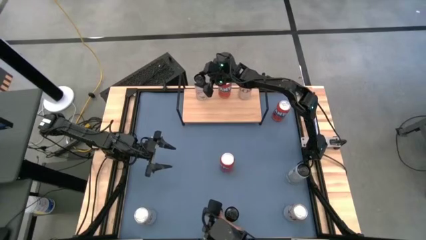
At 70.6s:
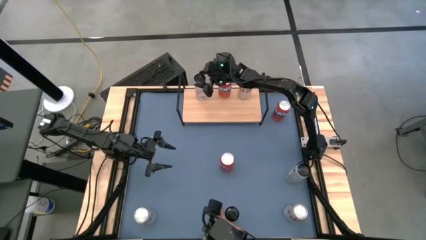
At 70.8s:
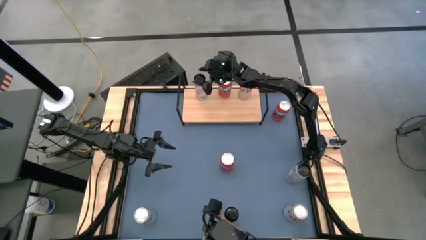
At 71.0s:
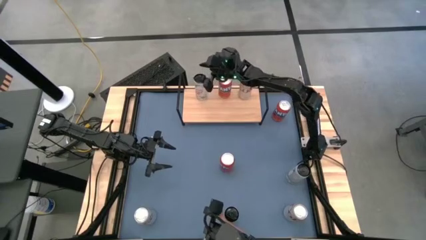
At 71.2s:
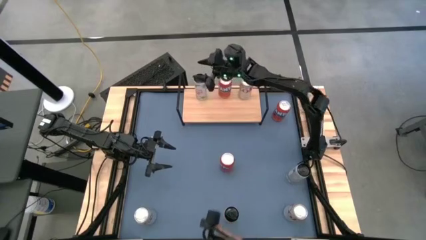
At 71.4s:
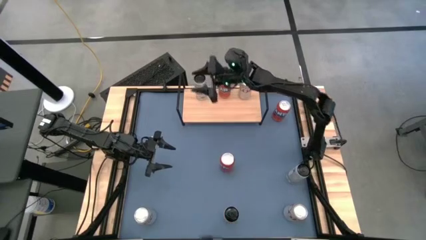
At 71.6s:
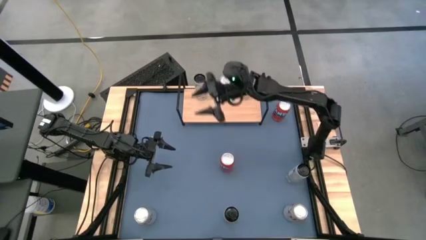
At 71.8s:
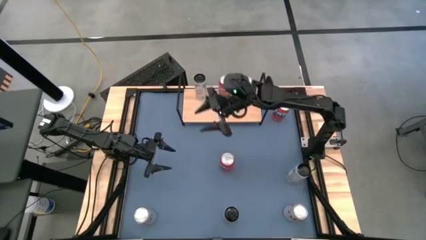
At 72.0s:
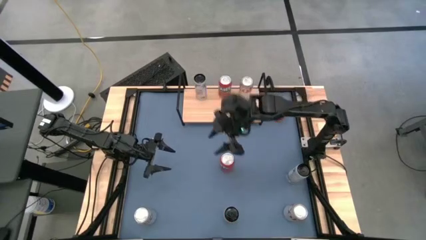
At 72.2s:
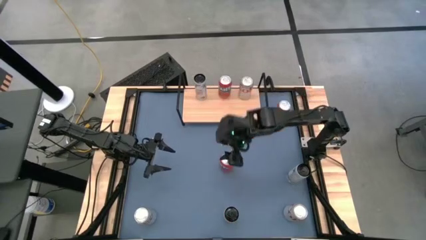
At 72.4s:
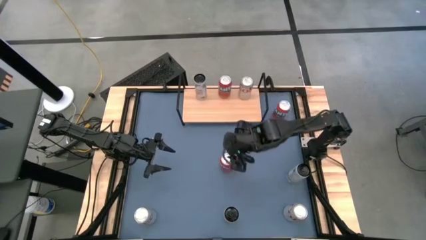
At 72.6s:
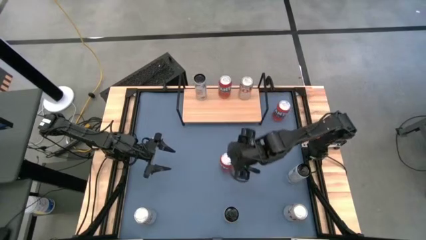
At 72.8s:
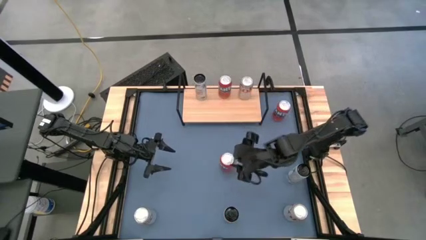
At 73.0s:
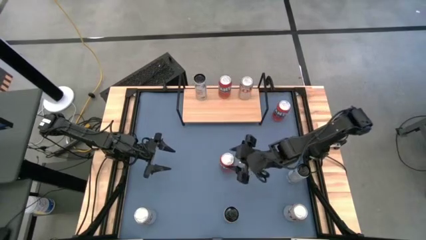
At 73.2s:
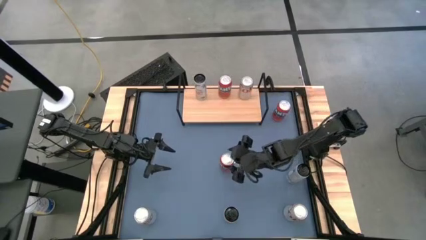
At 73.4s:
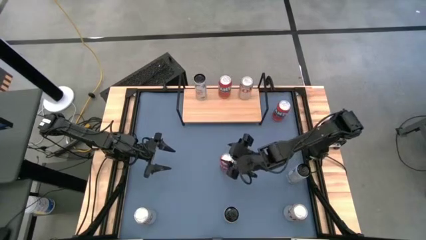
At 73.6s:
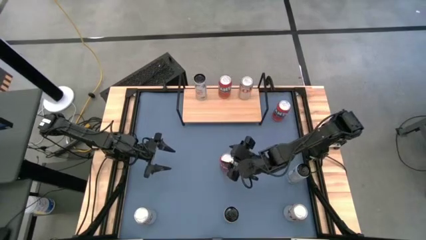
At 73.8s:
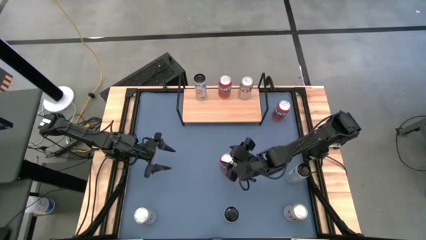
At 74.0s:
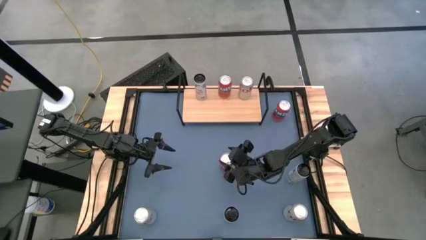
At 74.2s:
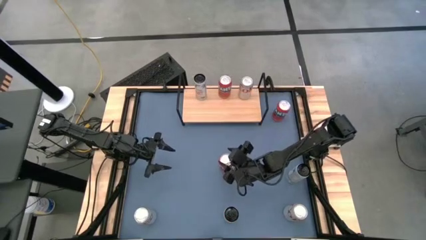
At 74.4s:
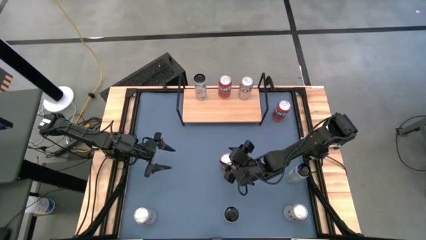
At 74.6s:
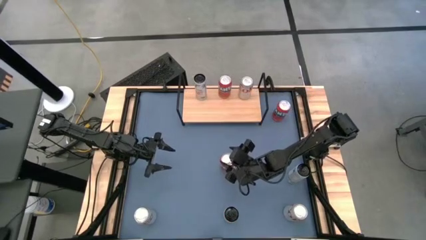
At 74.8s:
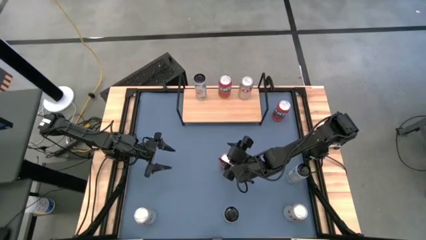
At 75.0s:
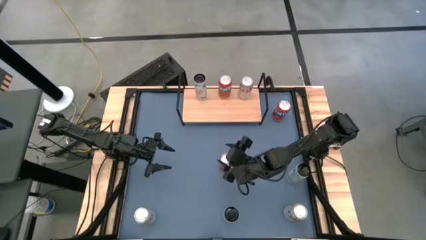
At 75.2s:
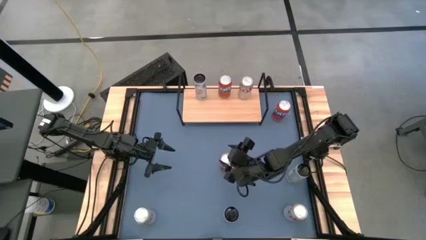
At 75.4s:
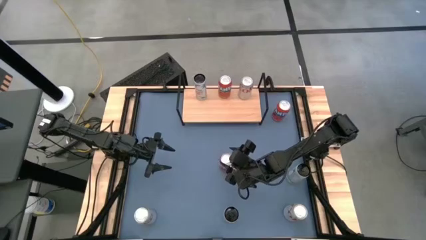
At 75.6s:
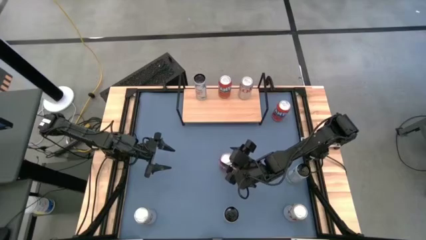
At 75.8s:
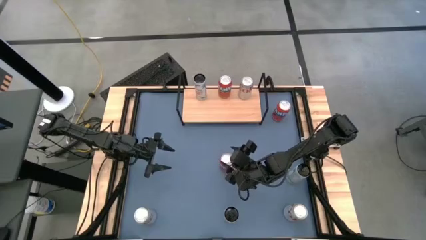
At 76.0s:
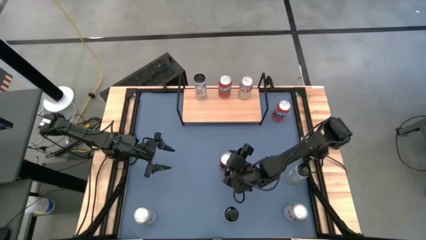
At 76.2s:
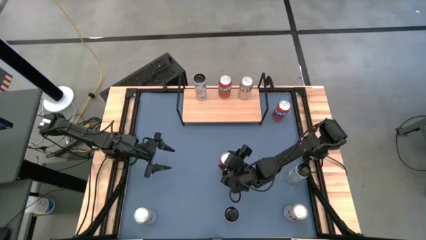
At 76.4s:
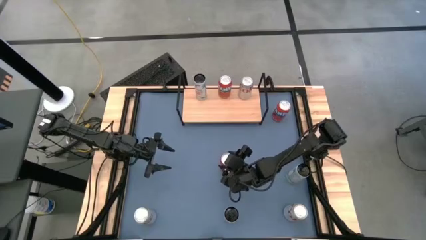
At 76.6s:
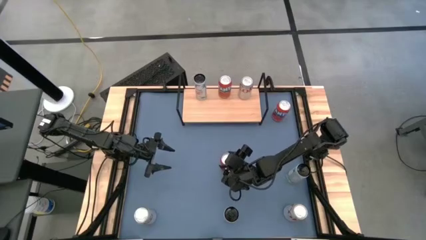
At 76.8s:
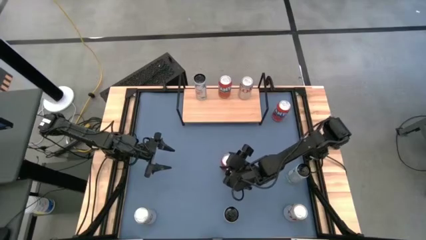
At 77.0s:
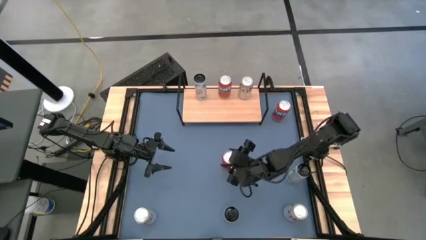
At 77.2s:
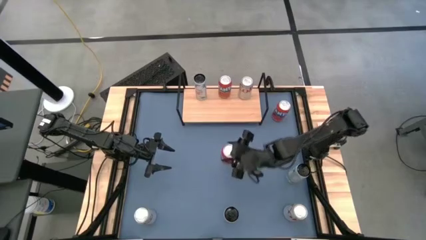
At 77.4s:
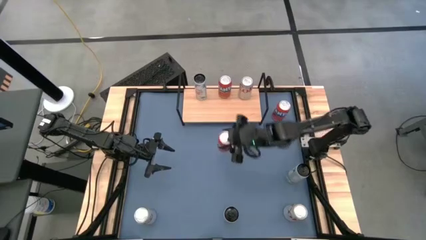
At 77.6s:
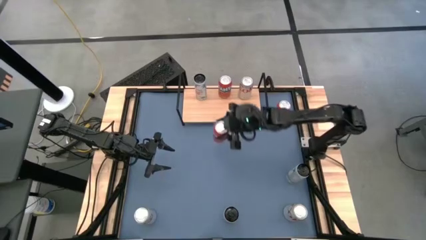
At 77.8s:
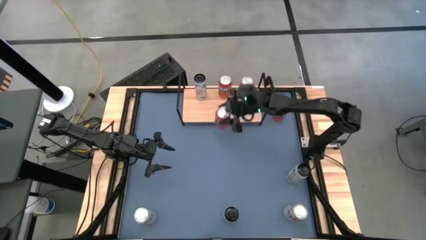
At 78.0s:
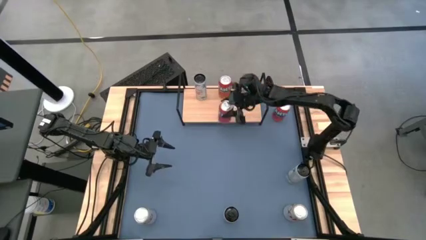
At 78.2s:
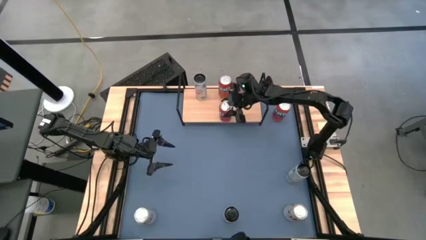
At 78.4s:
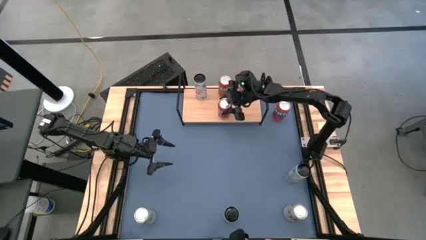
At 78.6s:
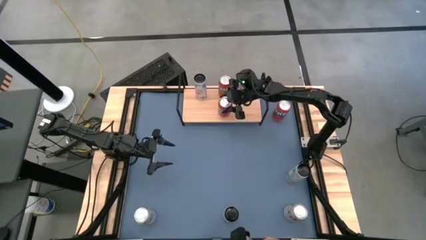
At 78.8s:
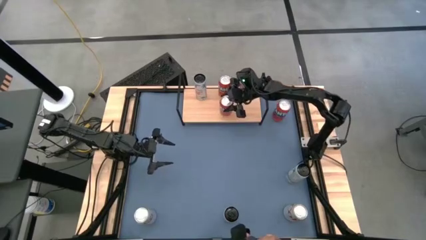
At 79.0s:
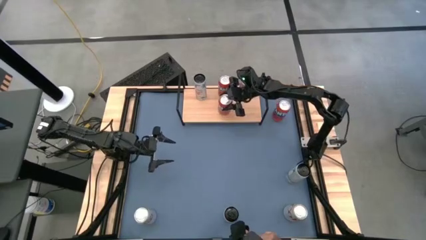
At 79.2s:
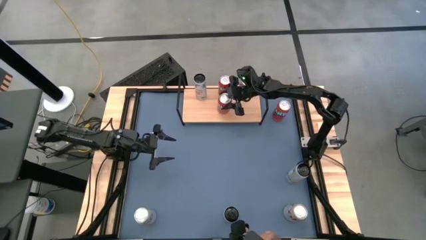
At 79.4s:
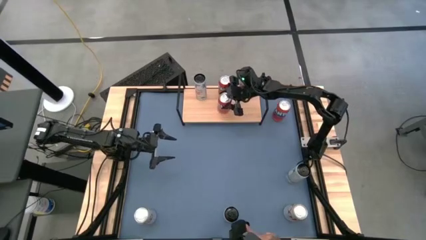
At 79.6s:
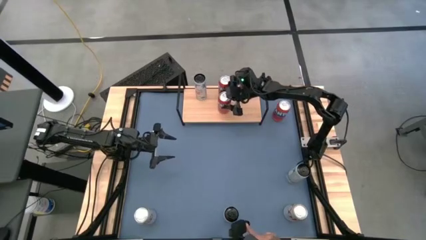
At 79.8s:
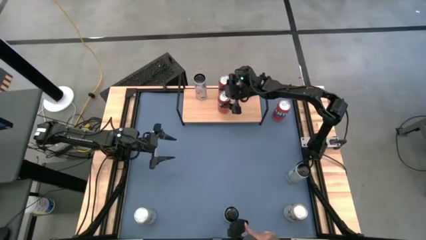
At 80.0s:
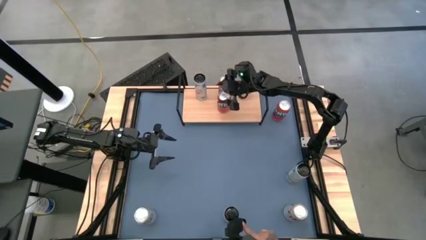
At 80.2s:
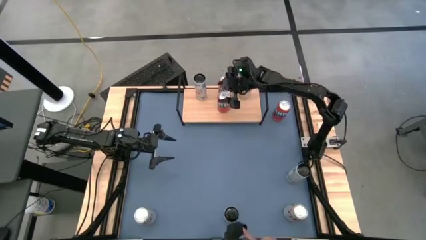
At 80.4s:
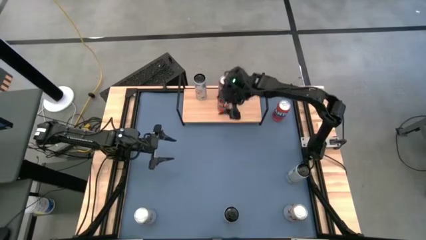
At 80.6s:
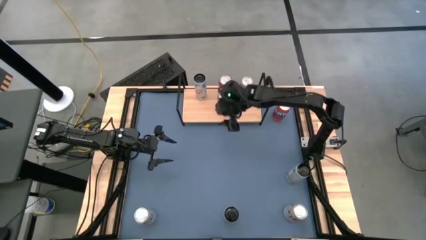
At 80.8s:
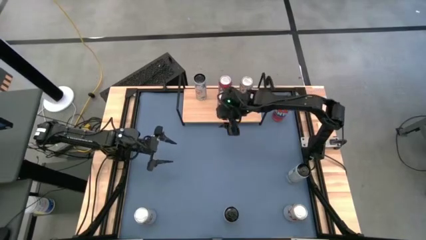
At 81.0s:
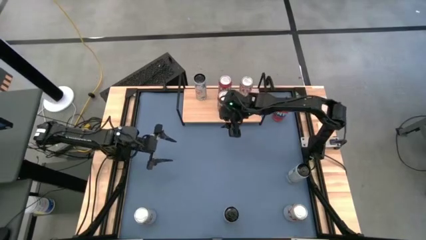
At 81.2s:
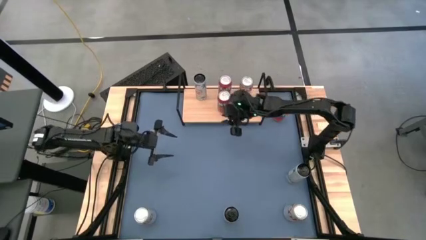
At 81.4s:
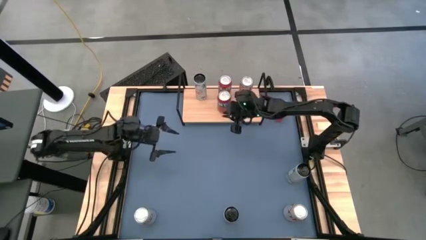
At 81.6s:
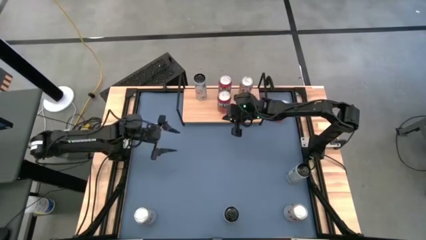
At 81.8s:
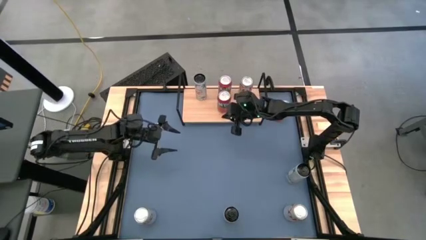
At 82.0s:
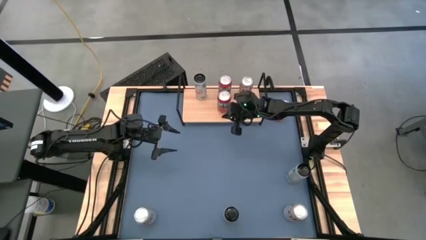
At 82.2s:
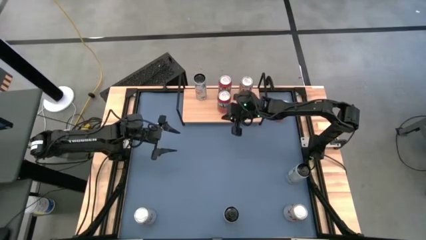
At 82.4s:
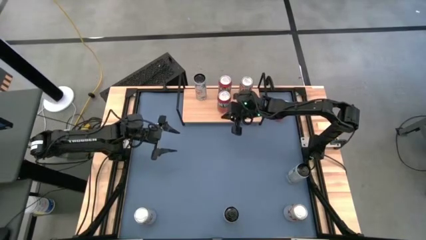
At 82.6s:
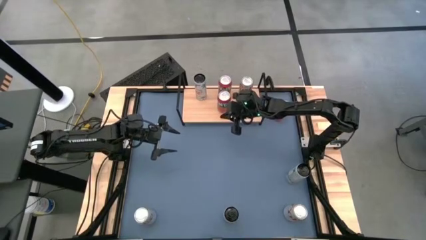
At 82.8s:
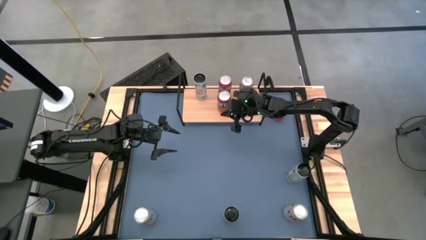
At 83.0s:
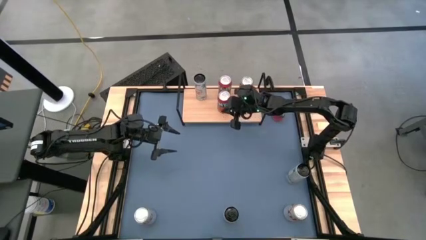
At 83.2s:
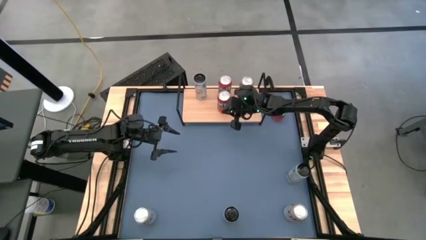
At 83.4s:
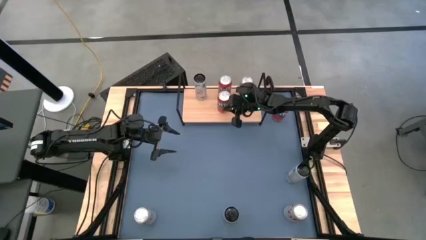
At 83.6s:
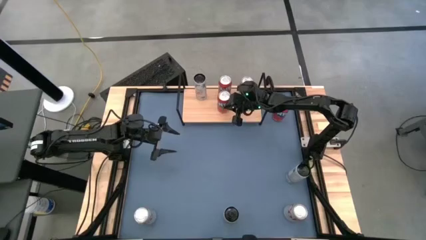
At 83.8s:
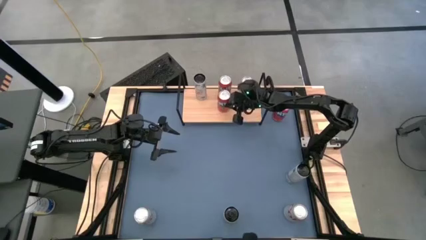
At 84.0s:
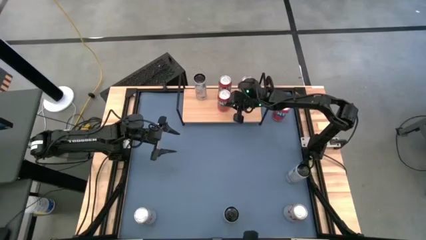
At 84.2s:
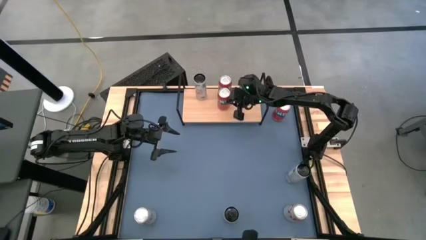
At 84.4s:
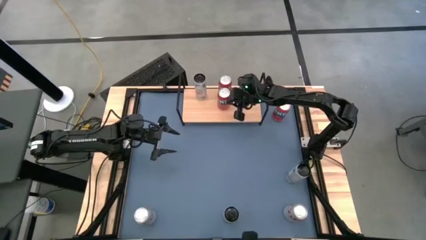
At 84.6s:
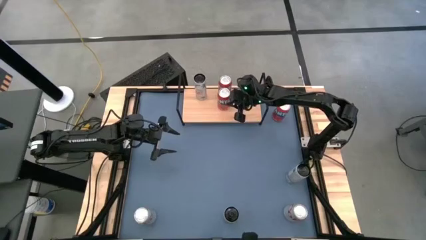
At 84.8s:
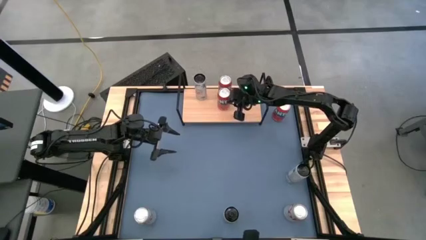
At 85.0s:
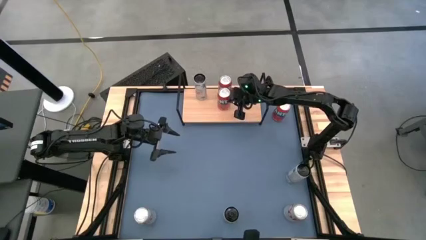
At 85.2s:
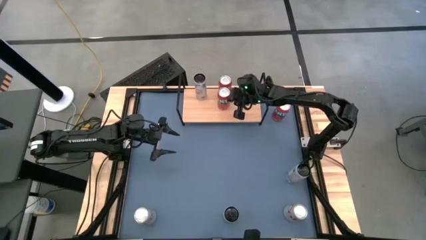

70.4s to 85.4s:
Task: Place canned beverage on shelf
Put the bottom orange soda can on the shelf aligned with the other orange soda can

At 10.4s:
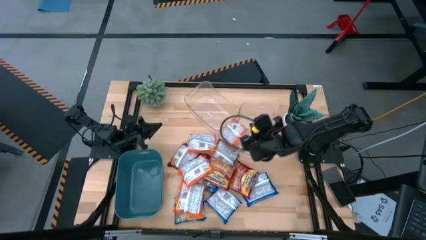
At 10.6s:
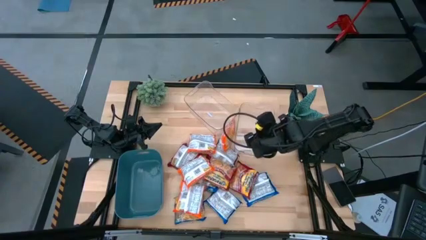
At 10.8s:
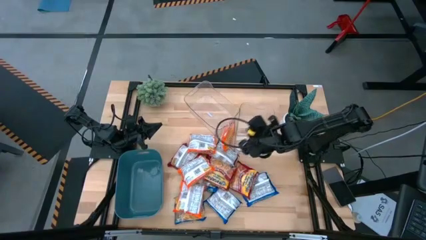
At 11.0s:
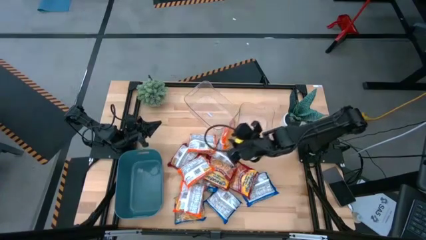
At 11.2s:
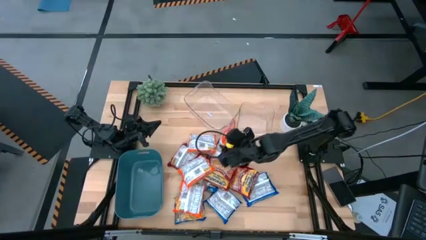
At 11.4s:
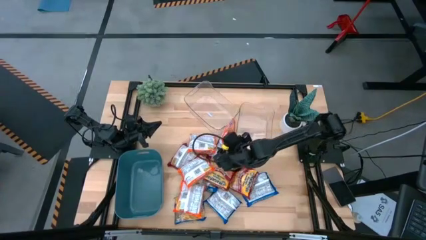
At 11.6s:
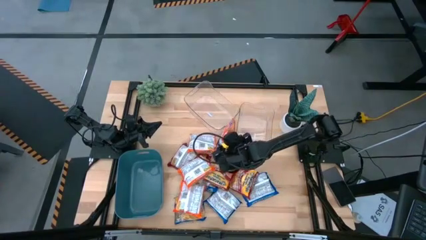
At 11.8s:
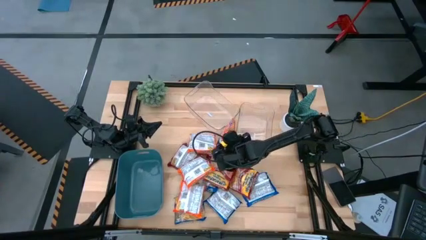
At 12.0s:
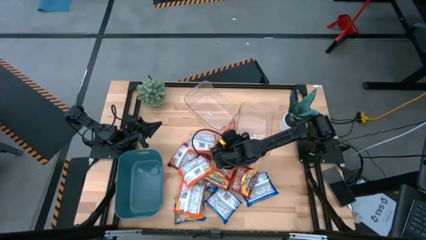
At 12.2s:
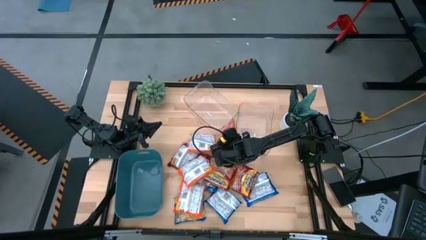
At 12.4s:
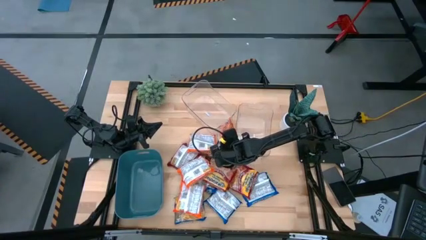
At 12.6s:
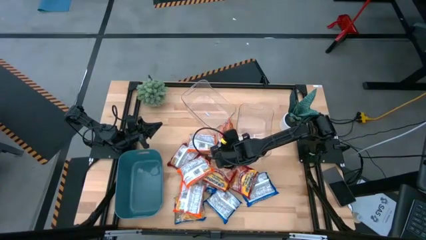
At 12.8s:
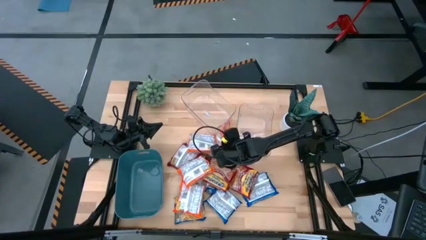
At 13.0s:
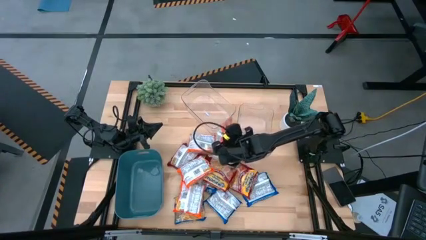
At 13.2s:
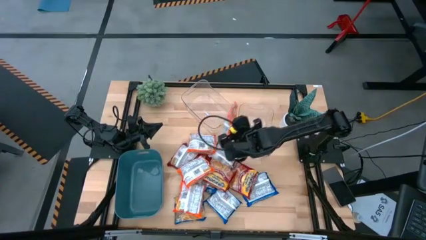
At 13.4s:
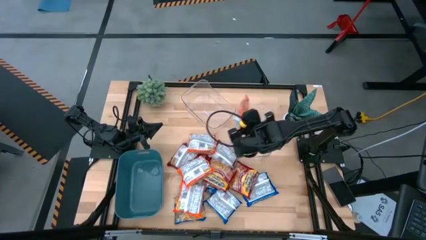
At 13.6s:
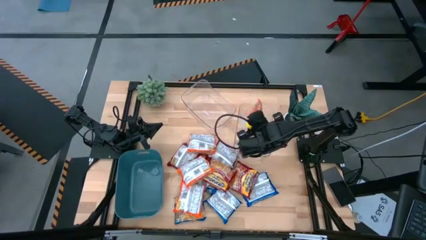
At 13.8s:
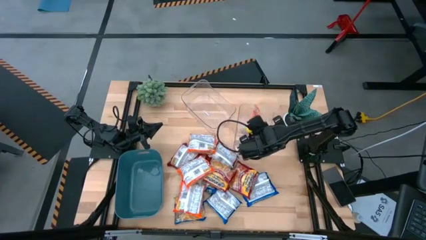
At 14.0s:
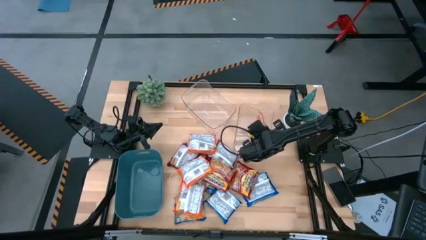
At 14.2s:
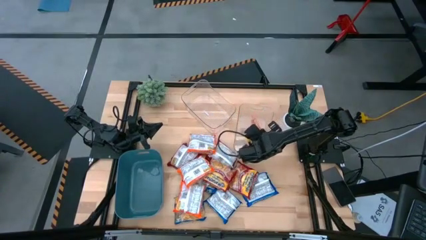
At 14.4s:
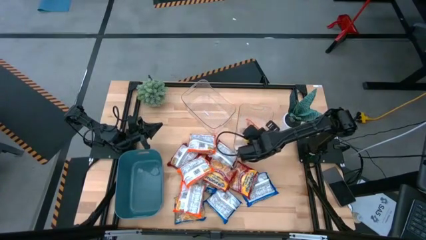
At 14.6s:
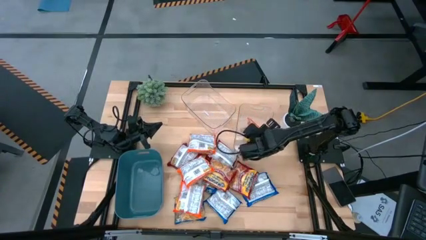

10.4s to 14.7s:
Task: Sort Maruchan noodles
Put the orange noodle into the right transparent bin
